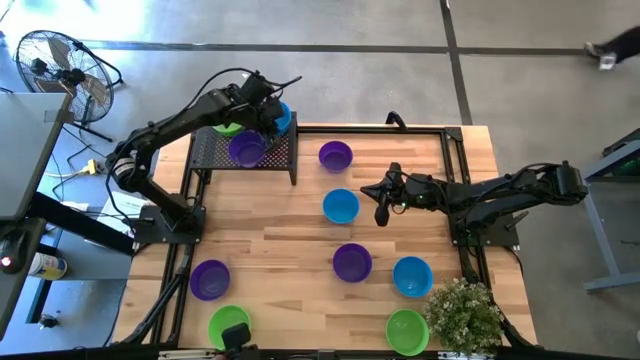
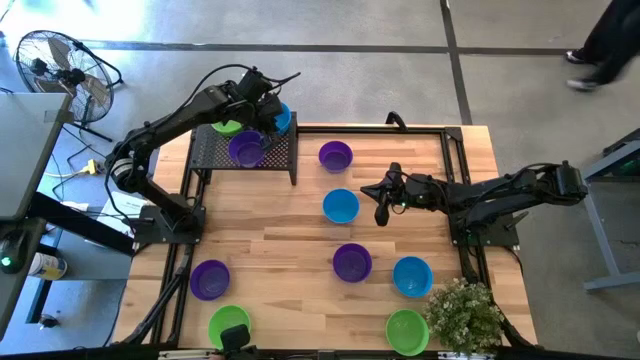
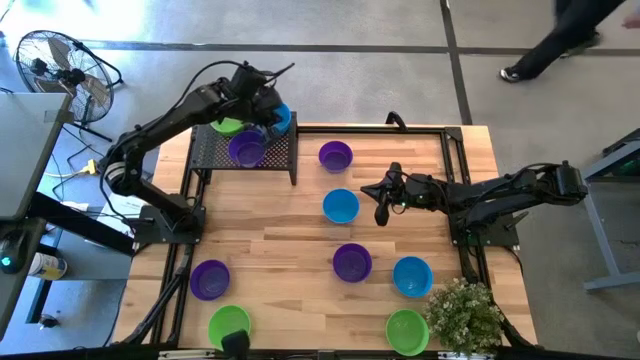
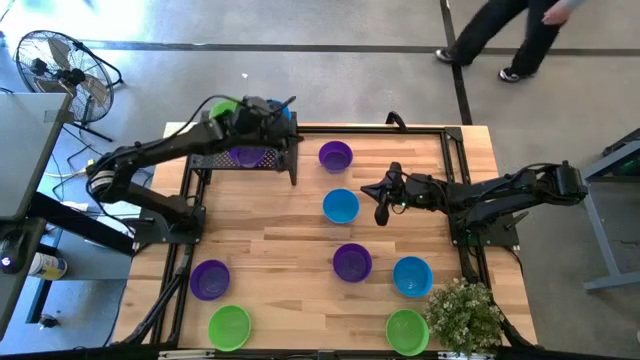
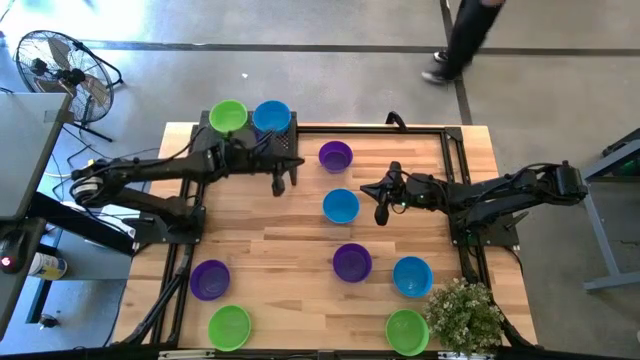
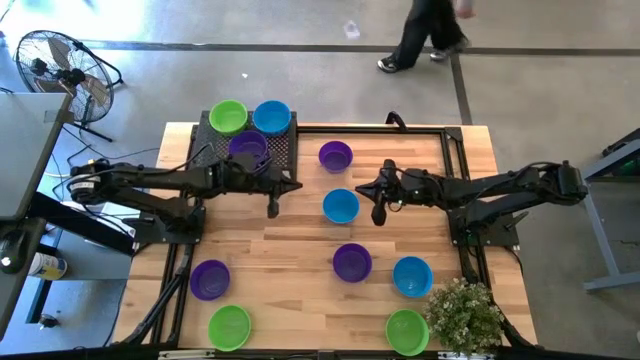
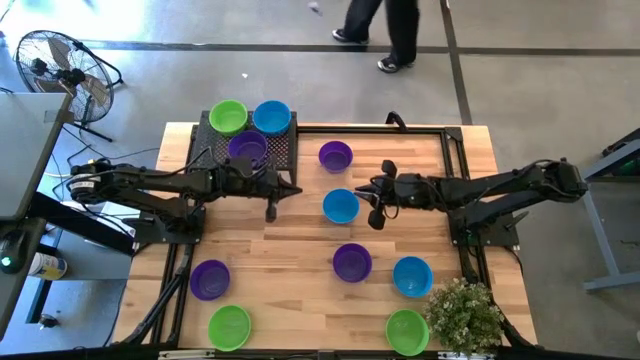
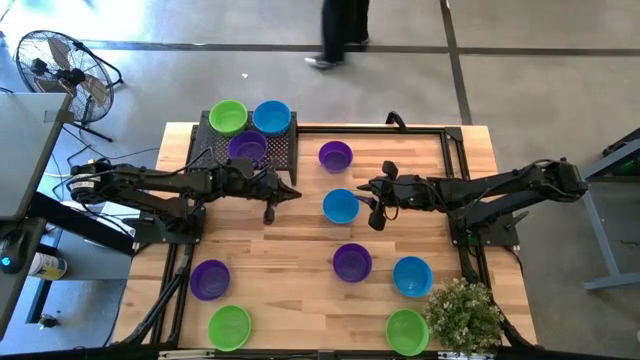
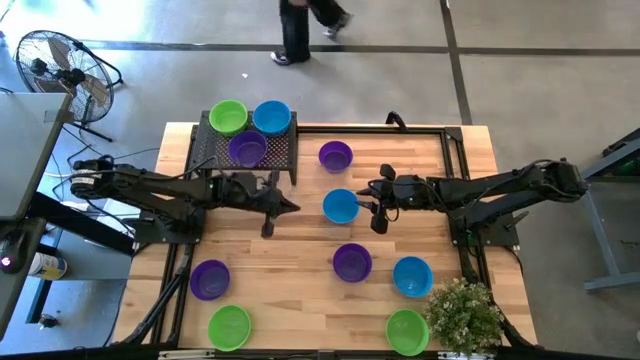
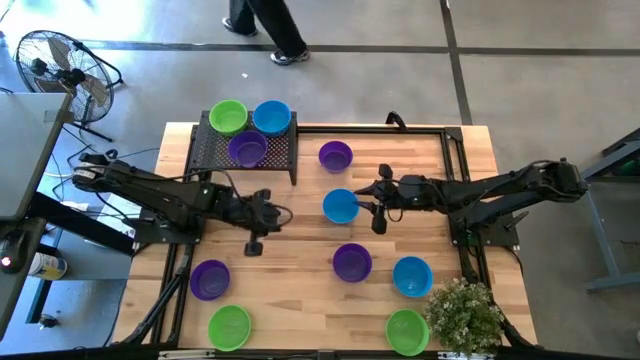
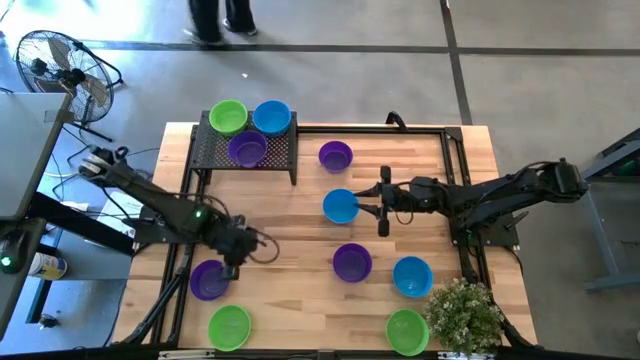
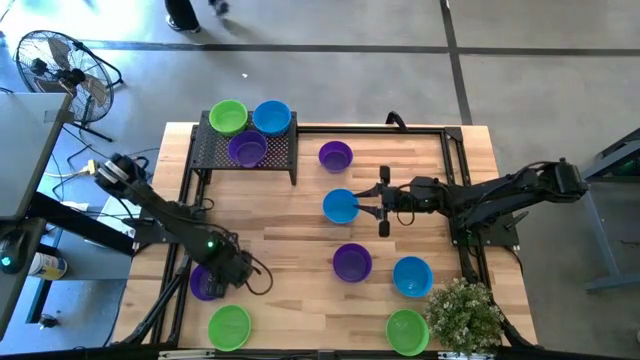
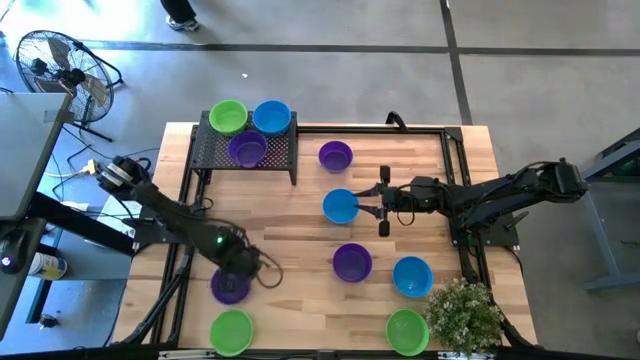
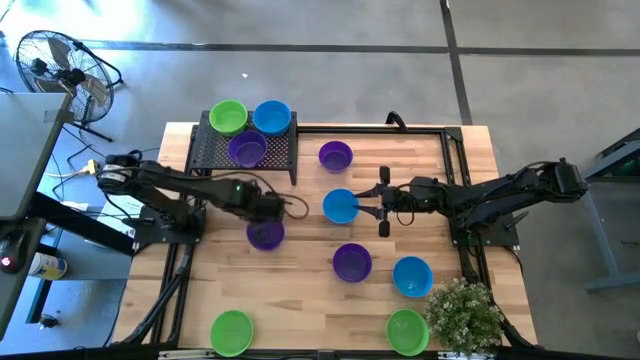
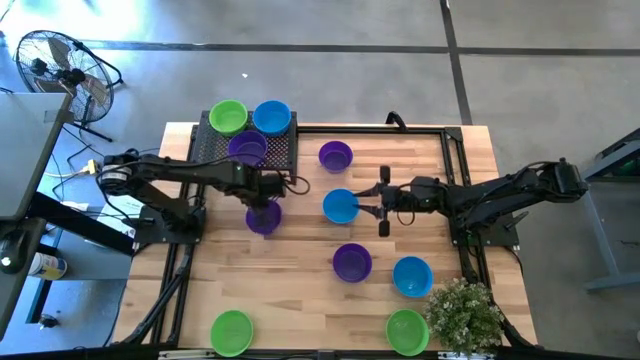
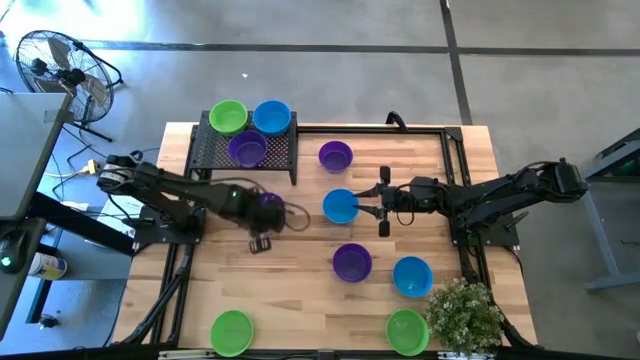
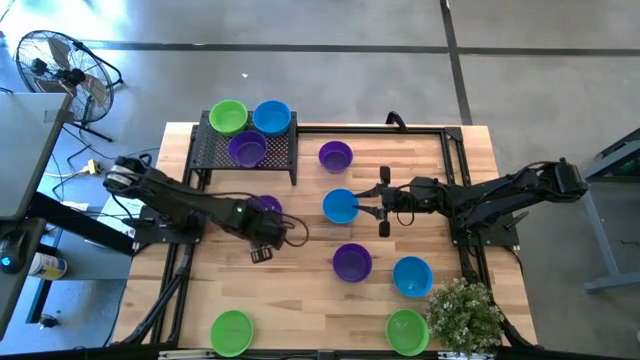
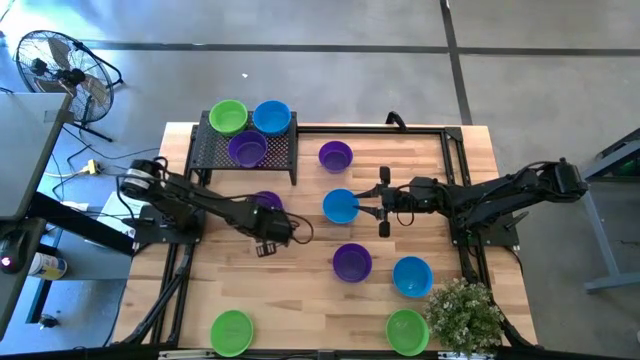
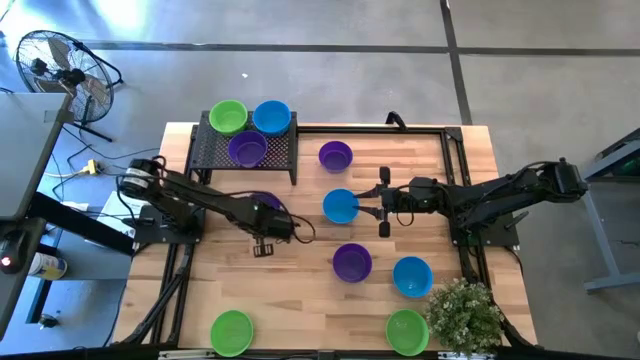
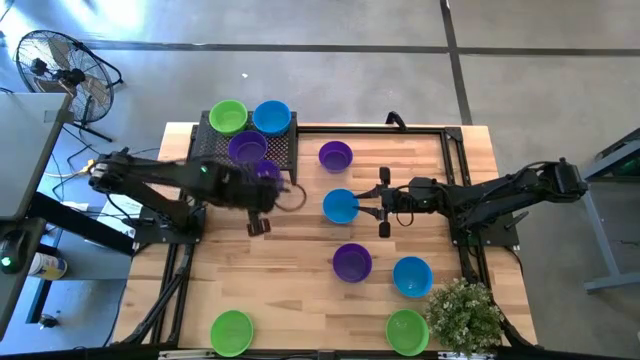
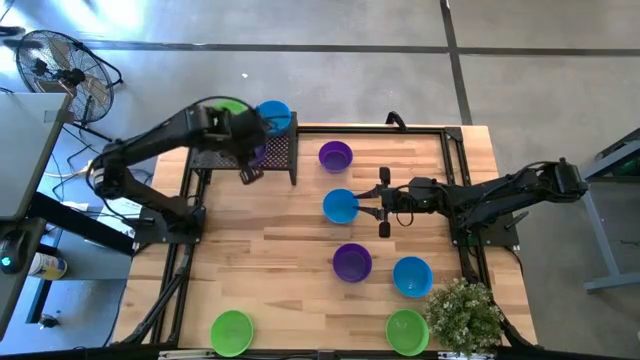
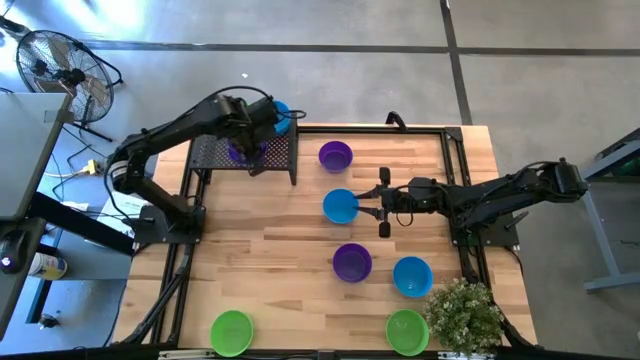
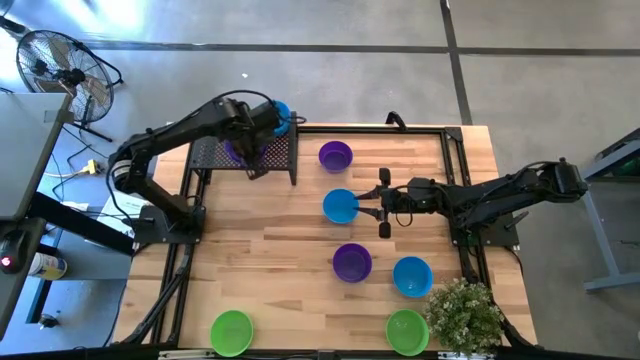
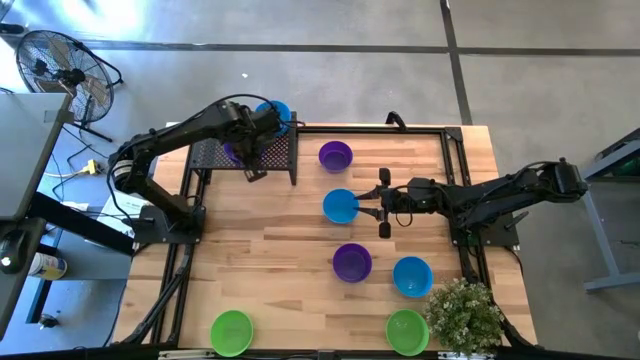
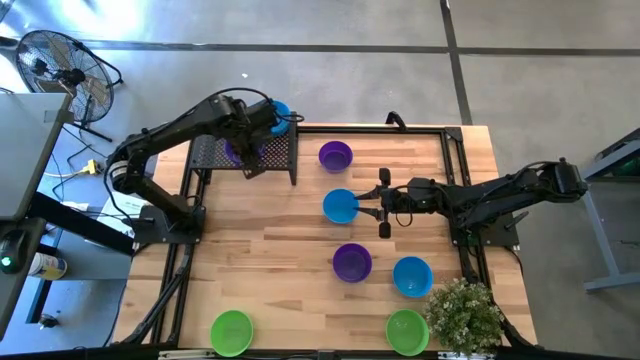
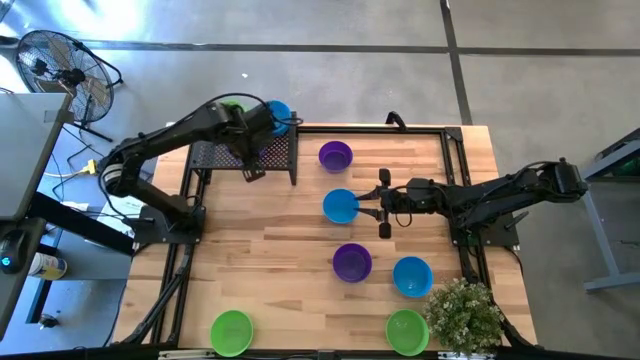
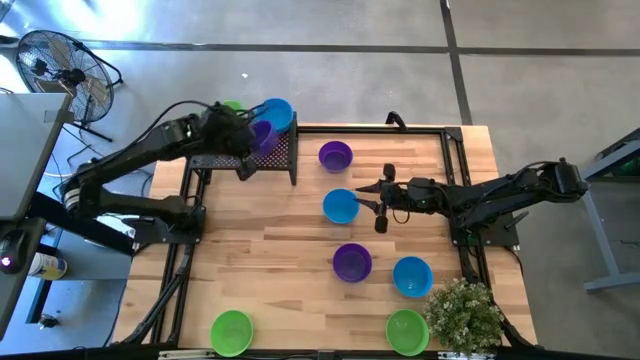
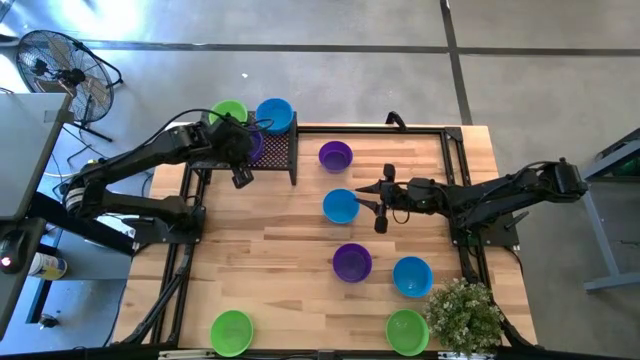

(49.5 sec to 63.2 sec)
Task: Pick & Place Mini bowls
Stack the violet bowl on top of the violet bowl on the shelf

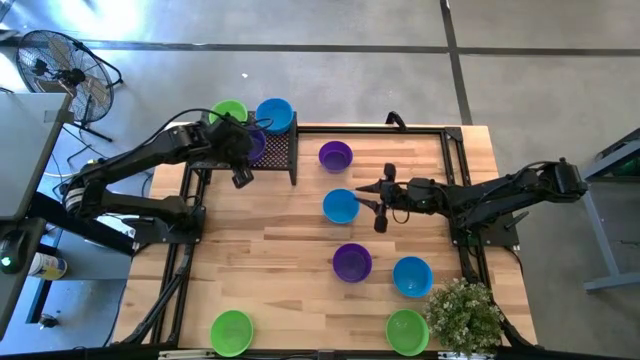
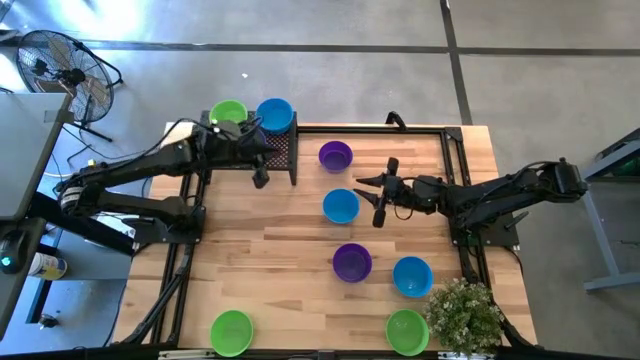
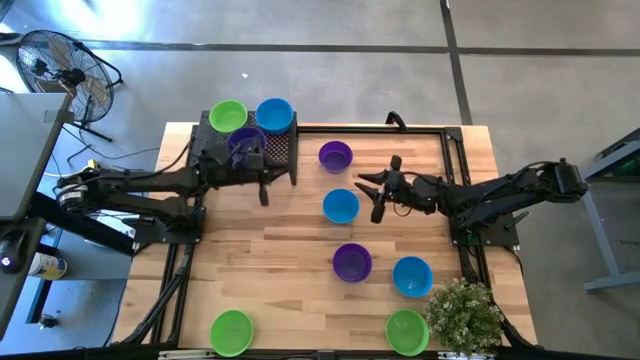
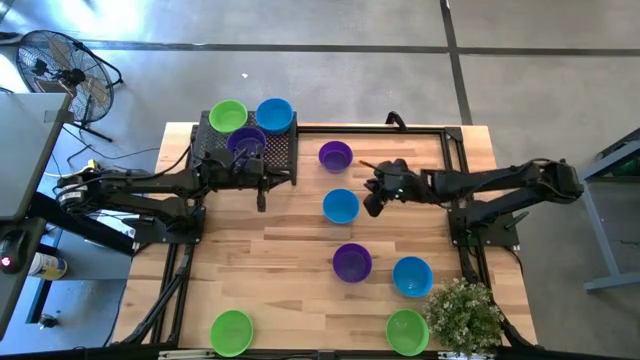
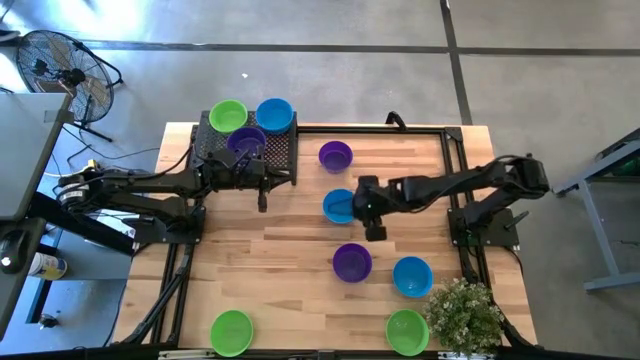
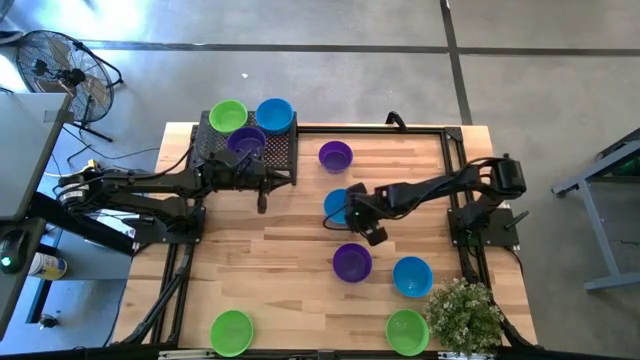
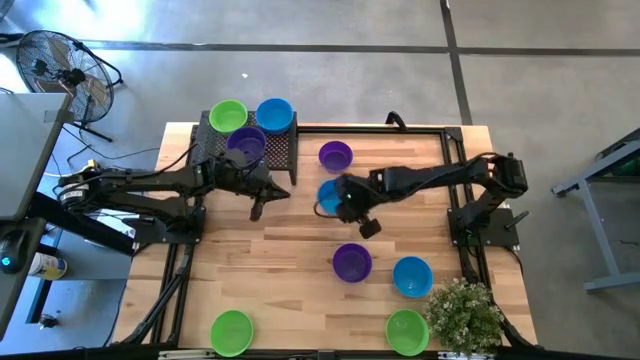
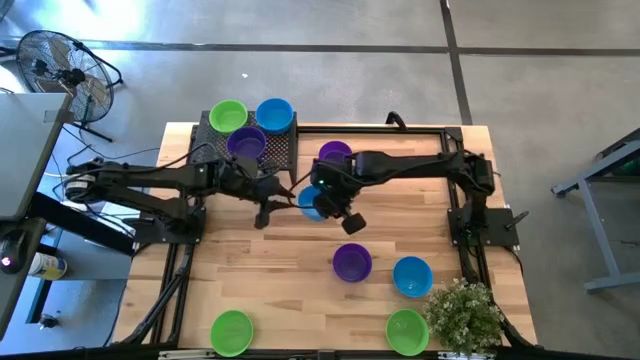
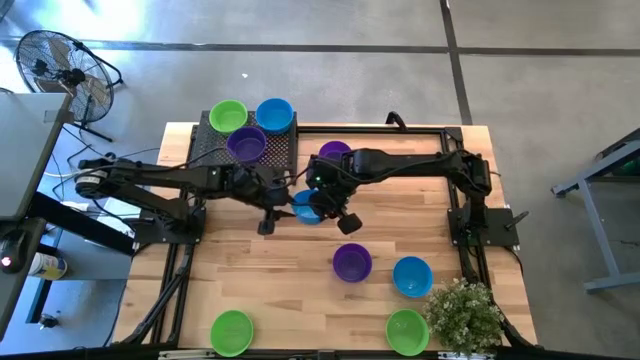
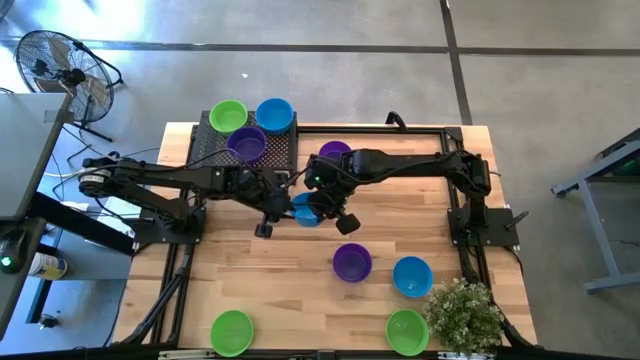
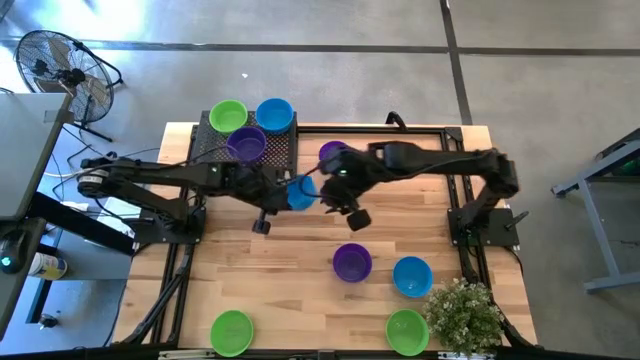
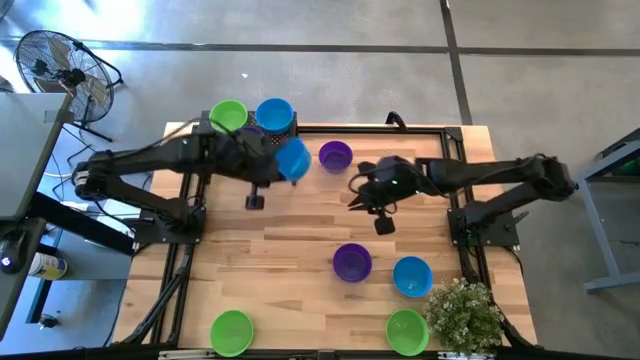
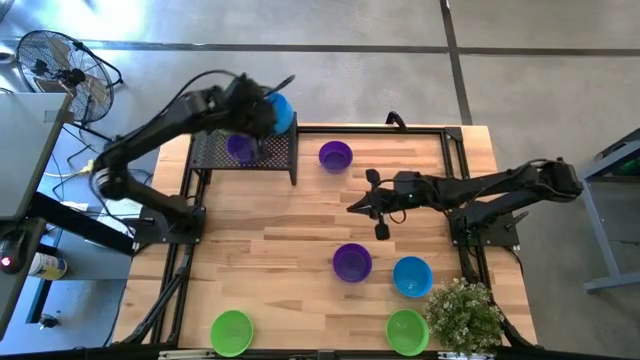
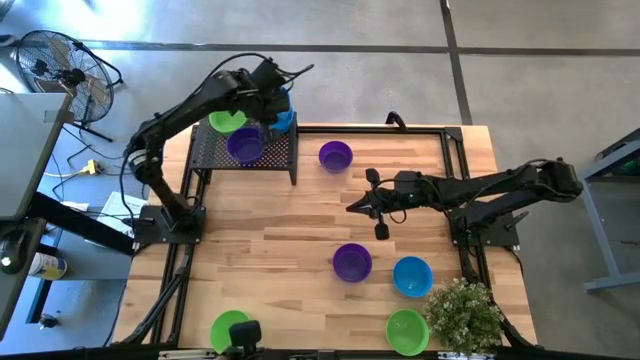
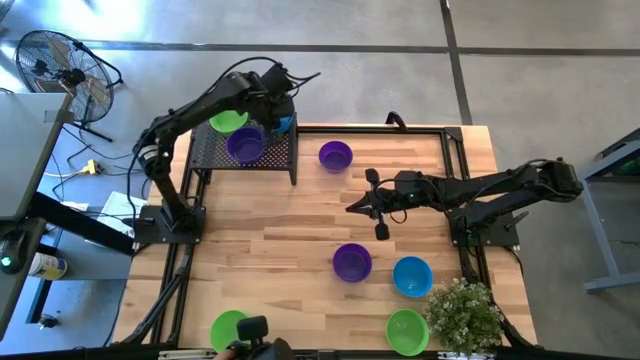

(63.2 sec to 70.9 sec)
Stack the blue bowl on top of the blue bowl on the shelf
